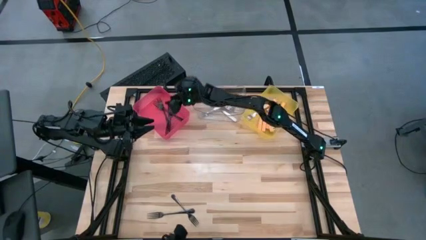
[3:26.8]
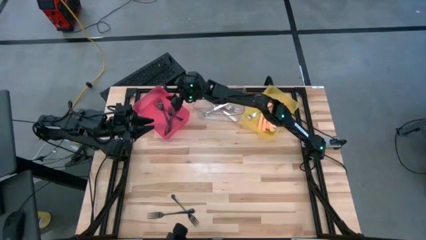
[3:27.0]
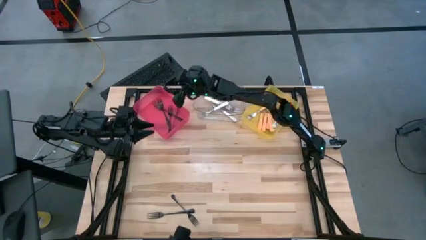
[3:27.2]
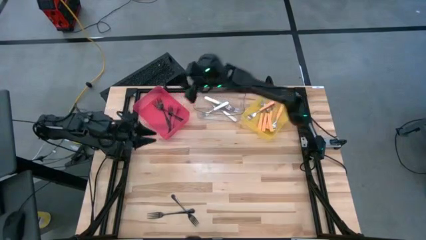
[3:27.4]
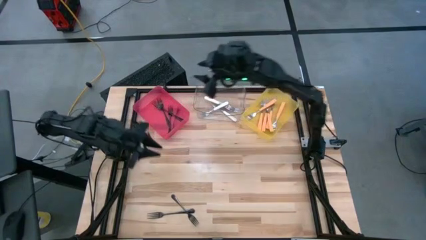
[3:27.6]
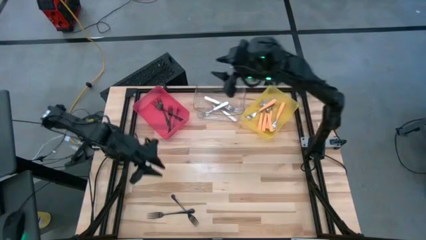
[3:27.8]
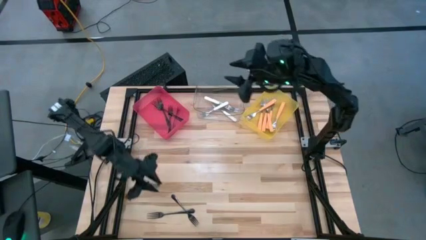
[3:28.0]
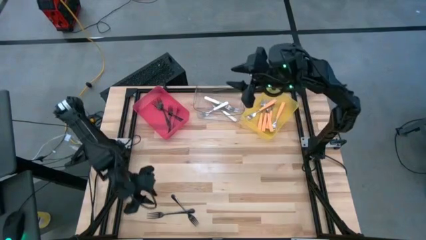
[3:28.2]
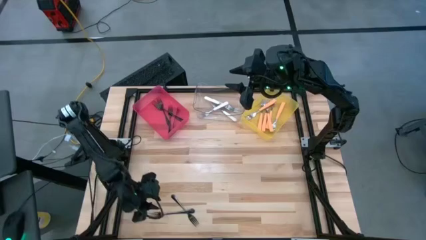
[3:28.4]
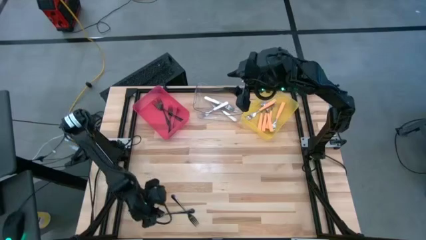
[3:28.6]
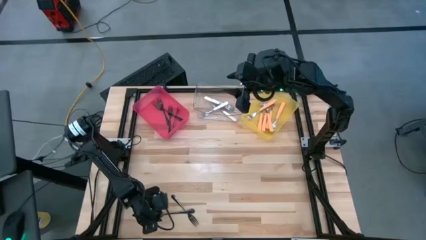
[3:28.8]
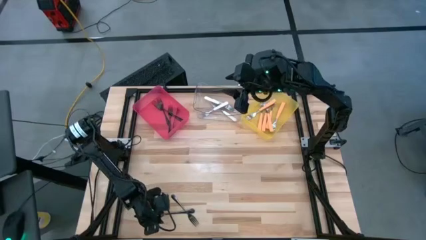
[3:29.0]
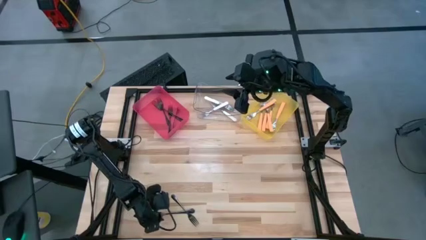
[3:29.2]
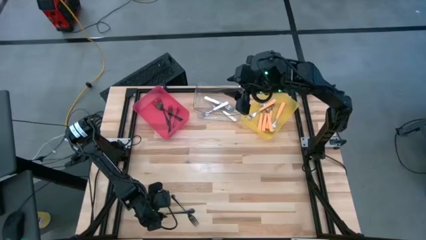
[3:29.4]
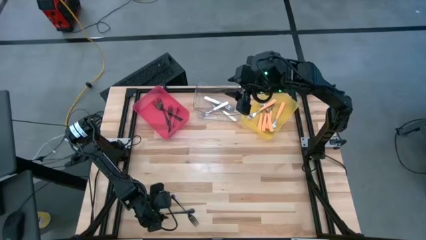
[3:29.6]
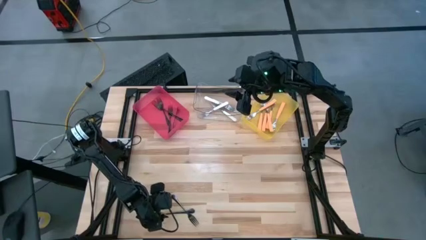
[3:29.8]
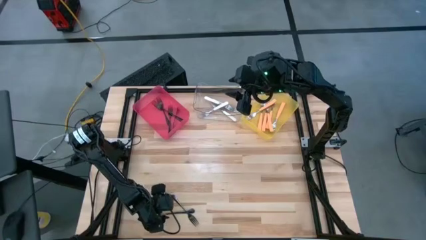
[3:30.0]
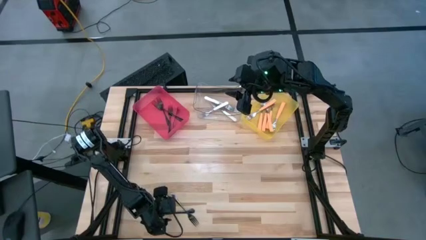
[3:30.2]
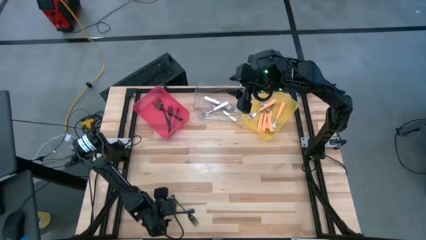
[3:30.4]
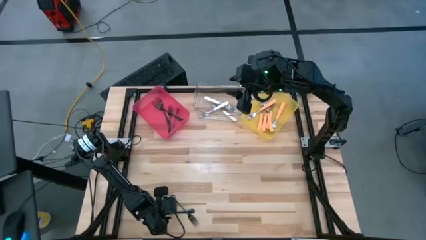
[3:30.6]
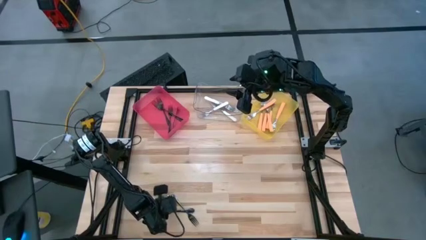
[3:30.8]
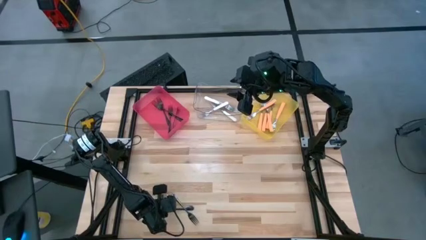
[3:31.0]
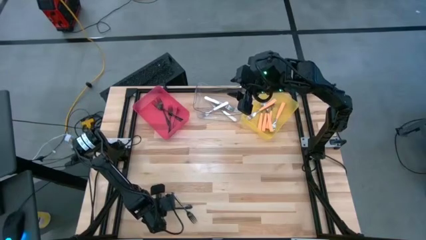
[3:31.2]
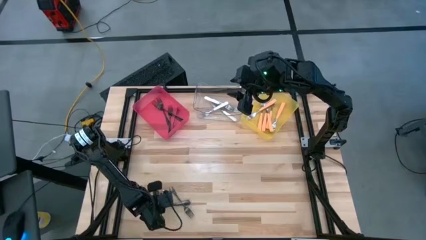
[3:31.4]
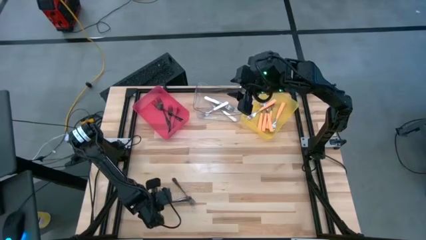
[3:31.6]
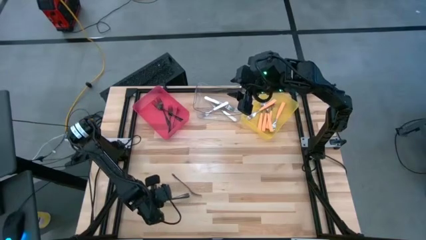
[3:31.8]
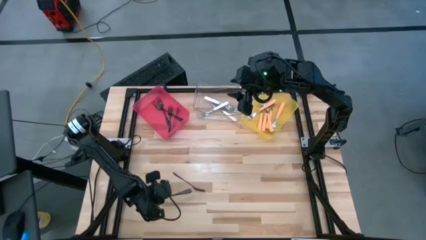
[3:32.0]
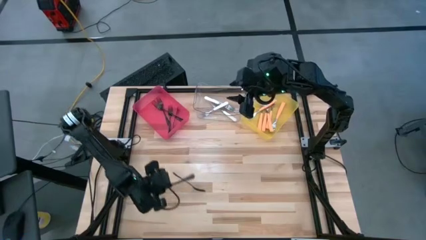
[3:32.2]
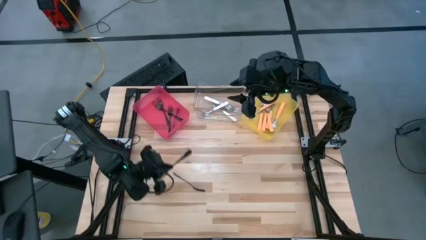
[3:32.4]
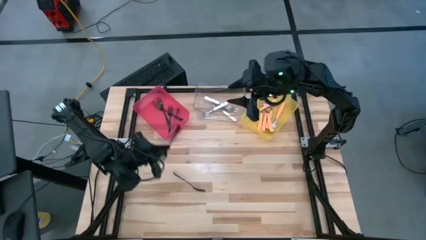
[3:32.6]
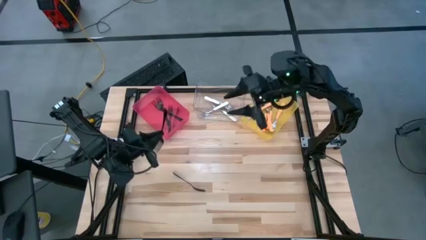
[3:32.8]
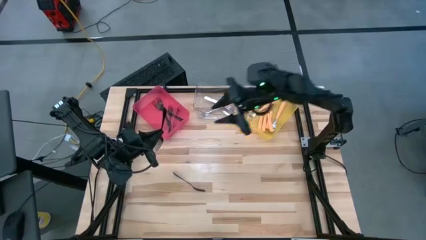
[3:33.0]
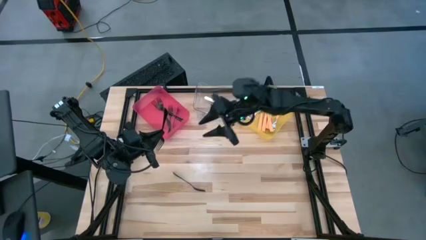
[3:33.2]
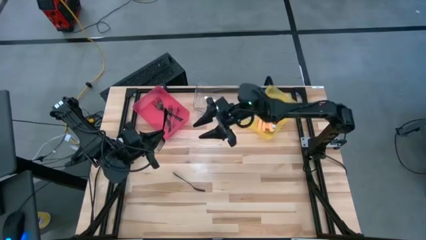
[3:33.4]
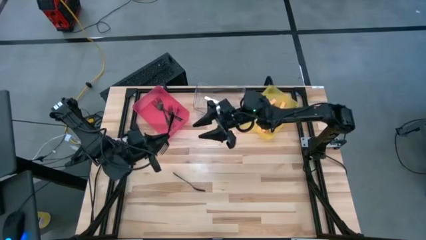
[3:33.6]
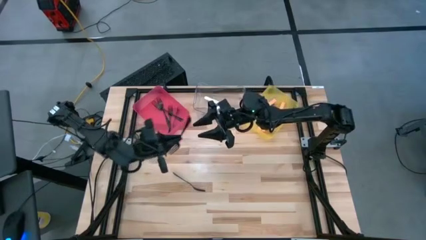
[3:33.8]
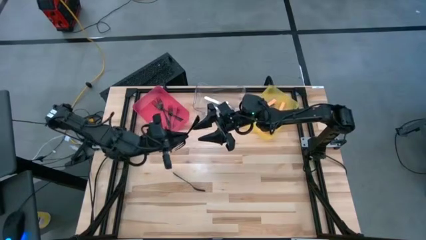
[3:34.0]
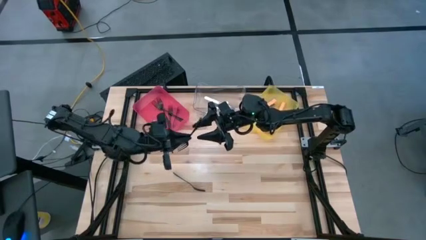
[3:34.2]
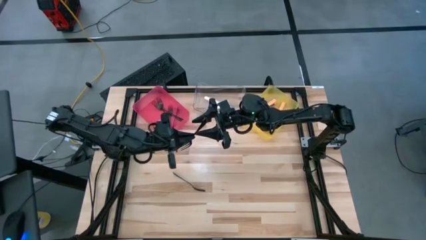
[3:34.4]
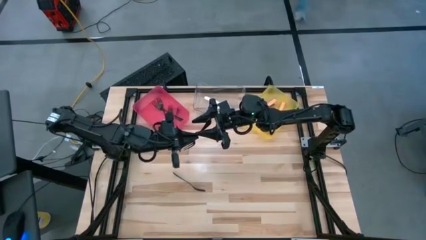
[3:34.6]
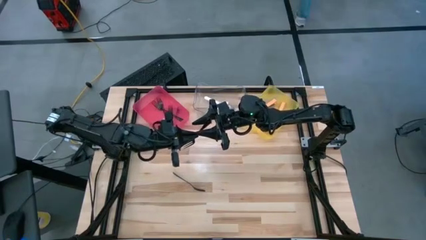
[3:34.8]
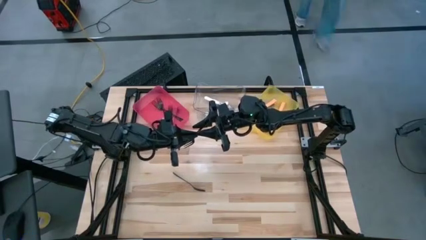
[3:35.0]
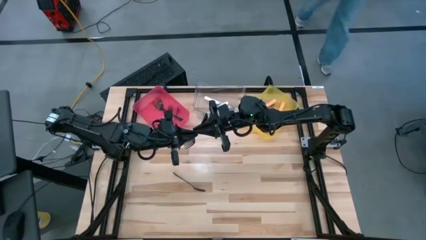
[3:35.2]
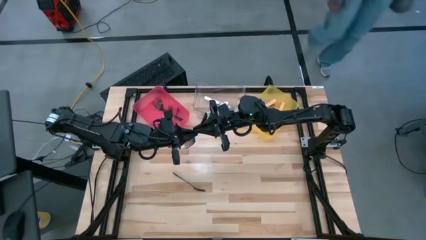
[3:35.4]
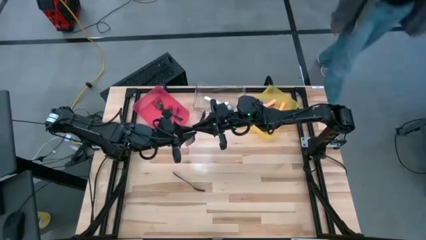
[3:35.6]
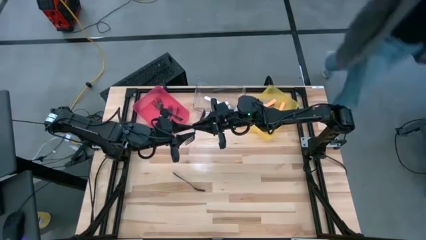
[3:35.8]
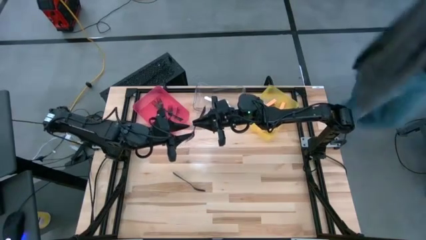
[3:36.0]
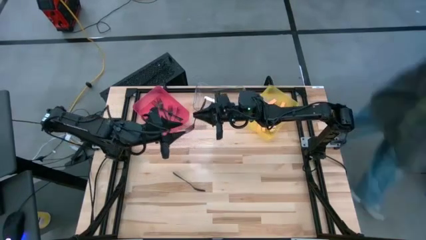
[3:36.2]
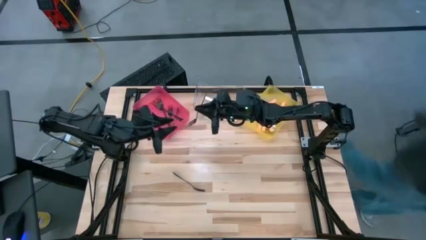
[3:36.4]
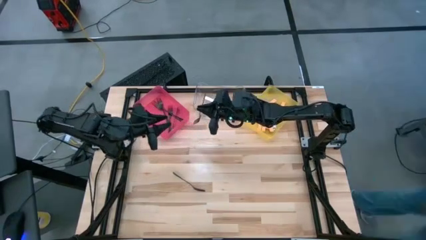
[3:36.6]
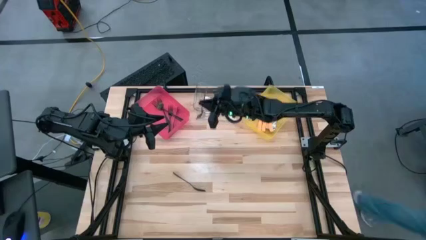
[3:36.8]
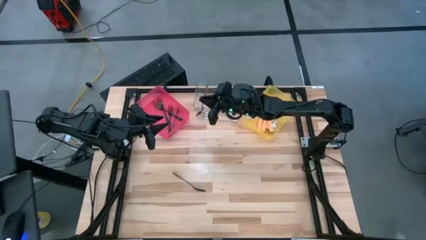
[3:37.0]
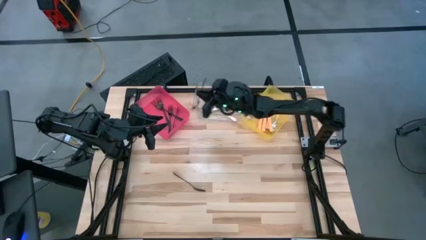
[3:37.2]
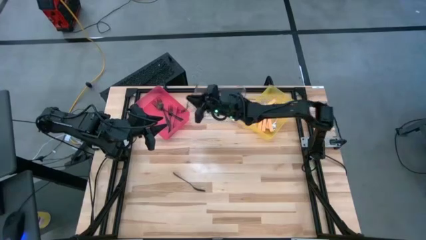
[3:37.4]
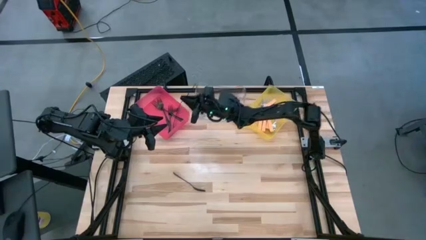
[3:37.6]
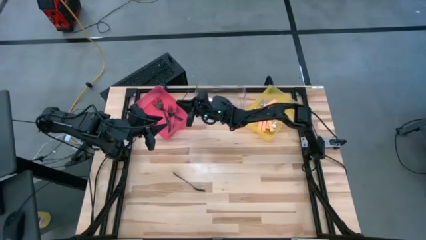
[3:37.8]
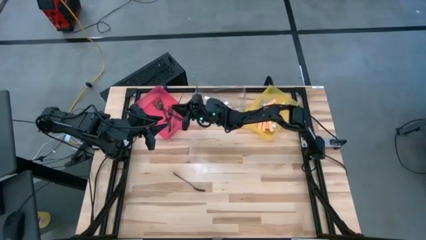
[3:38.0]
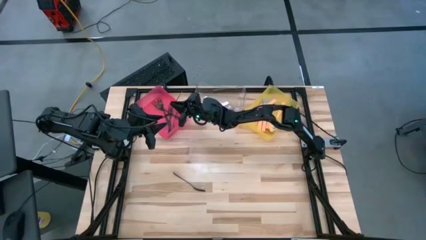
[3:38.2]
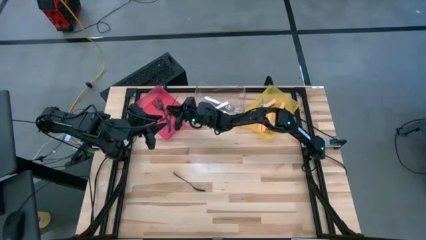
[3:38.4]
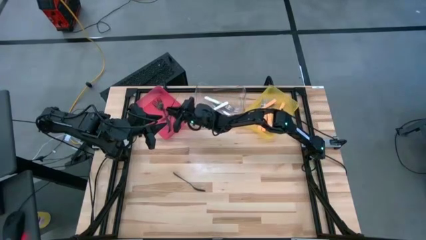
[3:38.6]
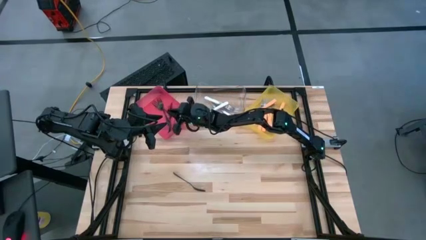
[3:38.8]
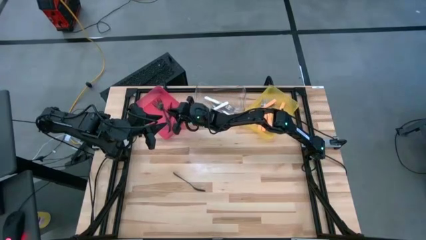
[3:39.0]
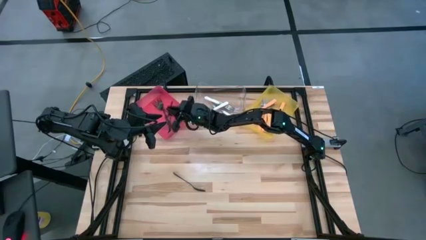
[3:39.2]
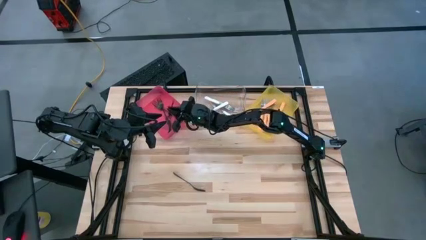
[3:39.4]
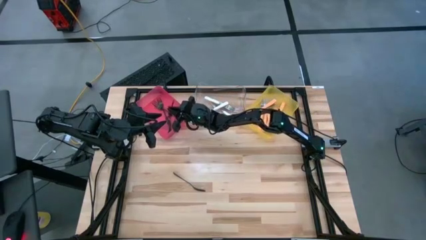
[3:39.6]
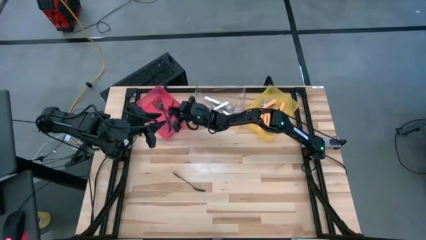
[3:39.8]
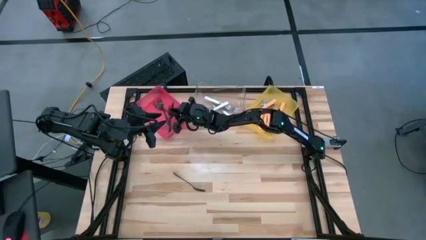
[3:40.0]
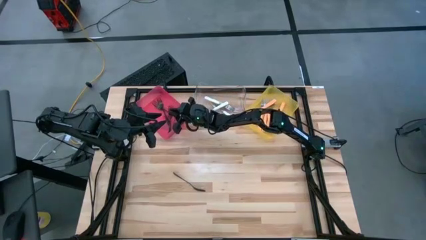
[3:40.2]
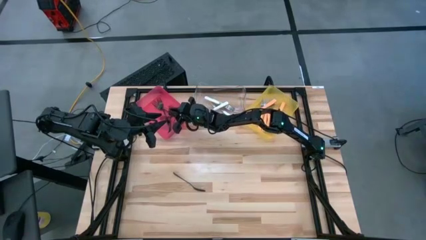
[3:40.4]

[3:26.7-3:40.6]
Task: Sort silverware by color (type)
Put the black fork into the pink bin
